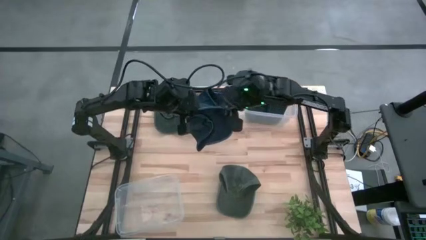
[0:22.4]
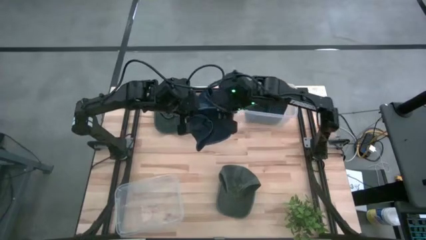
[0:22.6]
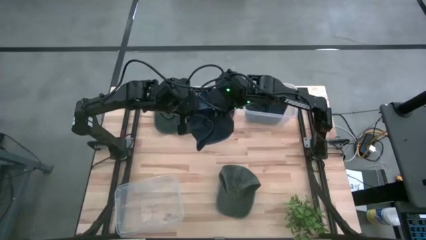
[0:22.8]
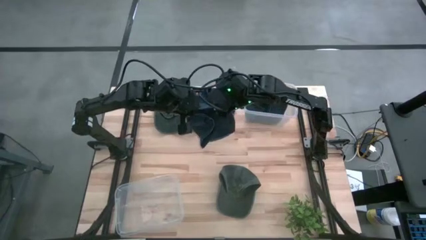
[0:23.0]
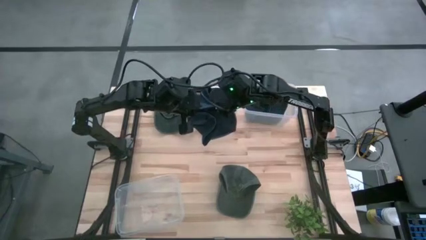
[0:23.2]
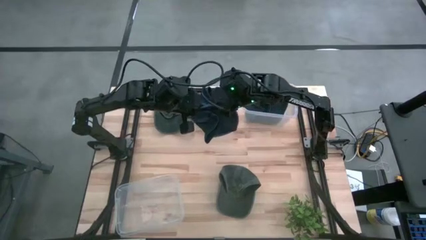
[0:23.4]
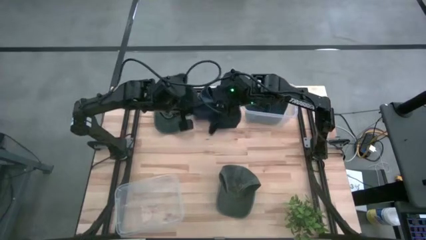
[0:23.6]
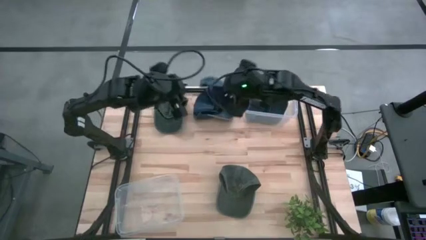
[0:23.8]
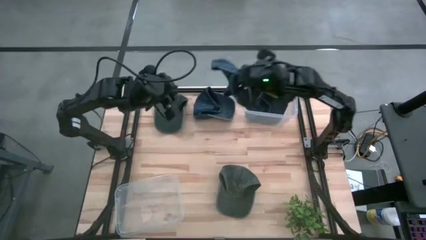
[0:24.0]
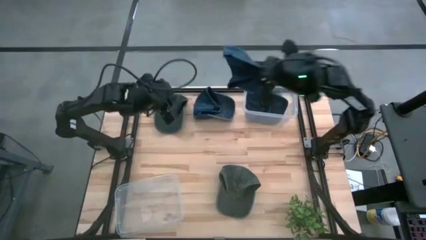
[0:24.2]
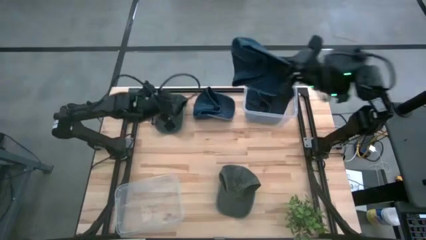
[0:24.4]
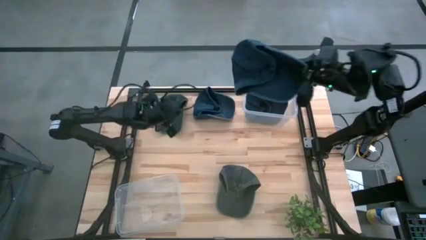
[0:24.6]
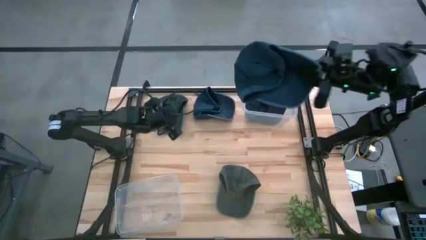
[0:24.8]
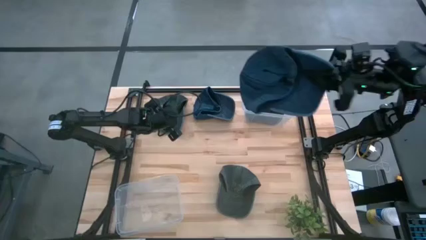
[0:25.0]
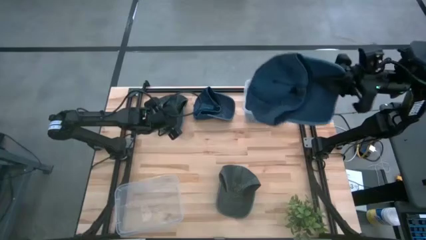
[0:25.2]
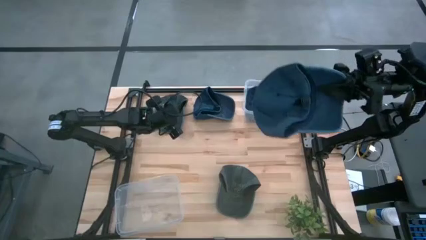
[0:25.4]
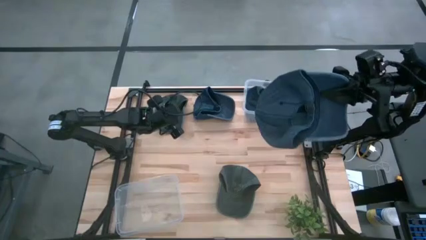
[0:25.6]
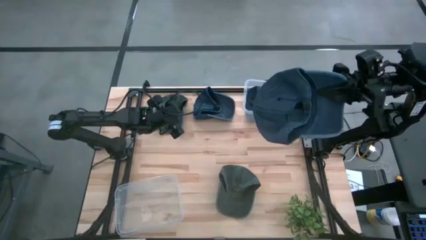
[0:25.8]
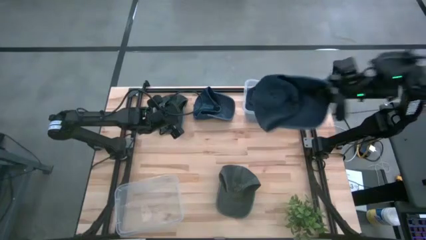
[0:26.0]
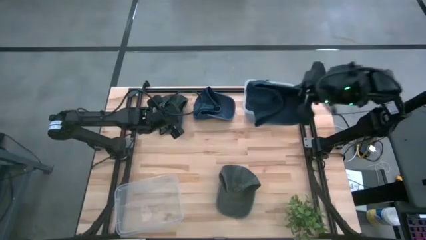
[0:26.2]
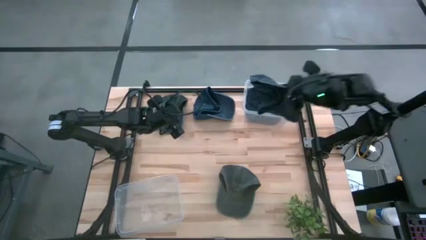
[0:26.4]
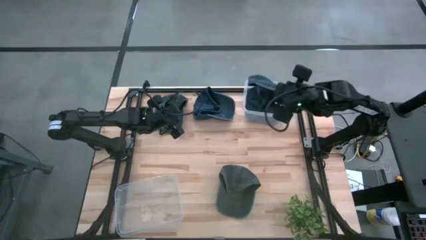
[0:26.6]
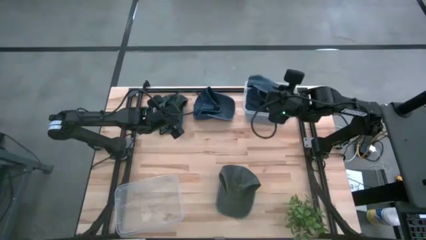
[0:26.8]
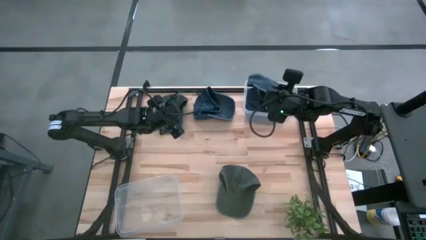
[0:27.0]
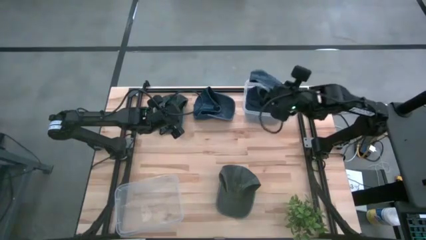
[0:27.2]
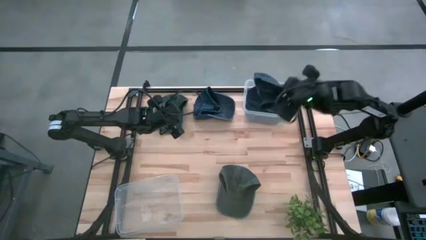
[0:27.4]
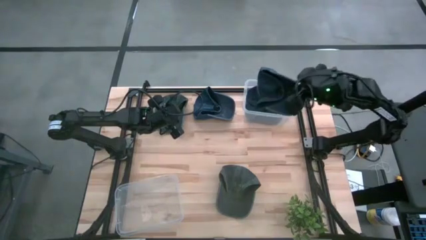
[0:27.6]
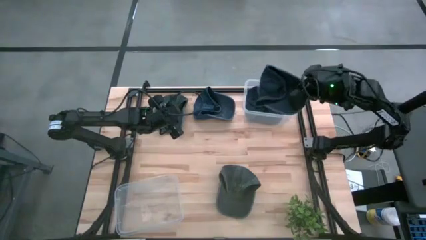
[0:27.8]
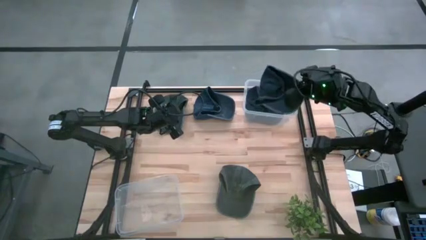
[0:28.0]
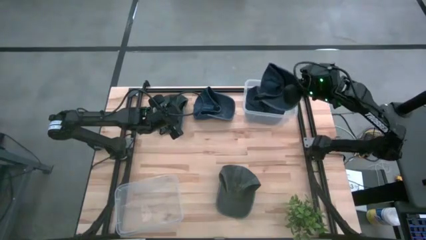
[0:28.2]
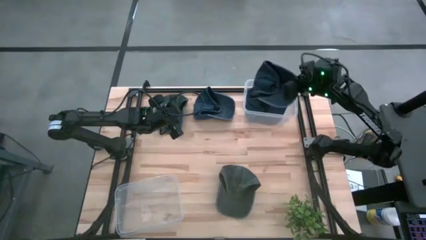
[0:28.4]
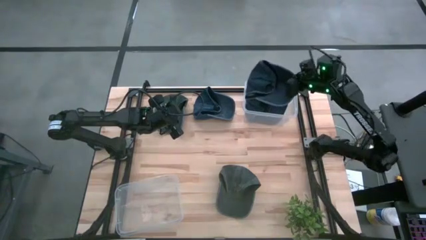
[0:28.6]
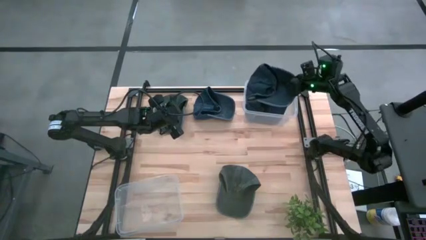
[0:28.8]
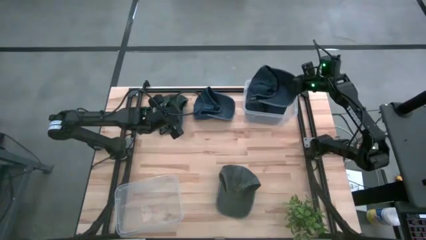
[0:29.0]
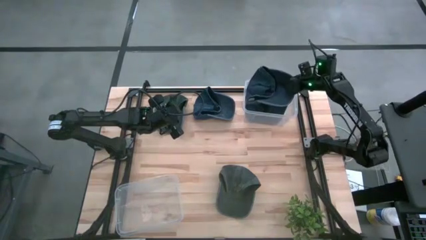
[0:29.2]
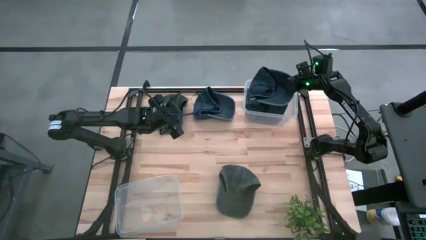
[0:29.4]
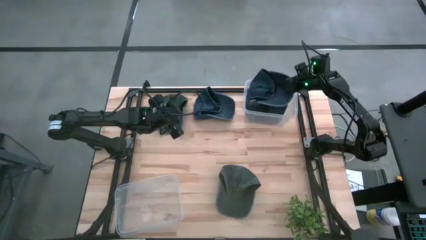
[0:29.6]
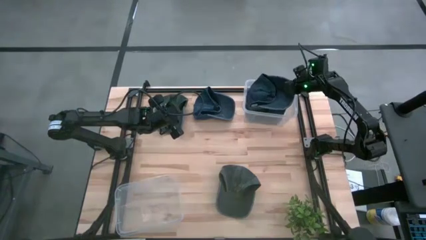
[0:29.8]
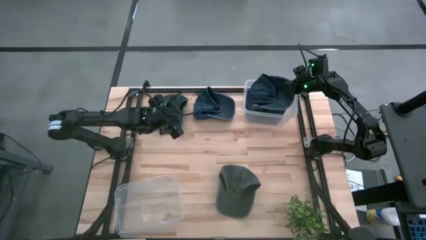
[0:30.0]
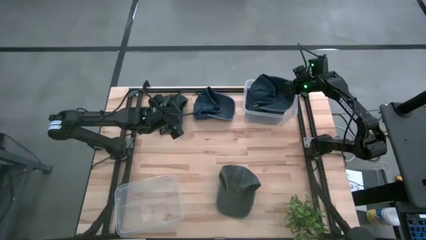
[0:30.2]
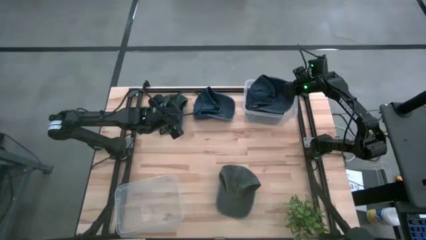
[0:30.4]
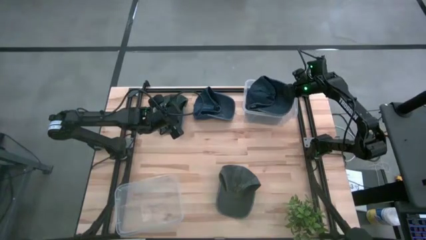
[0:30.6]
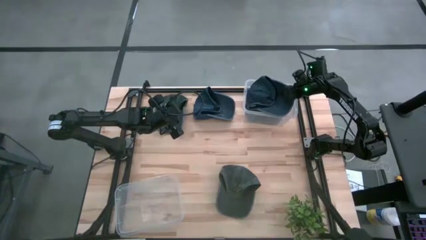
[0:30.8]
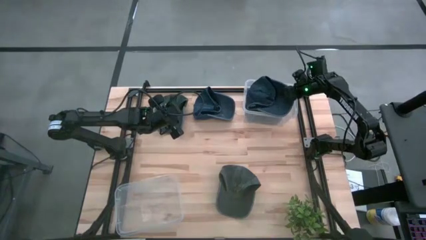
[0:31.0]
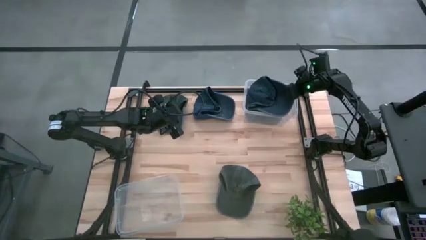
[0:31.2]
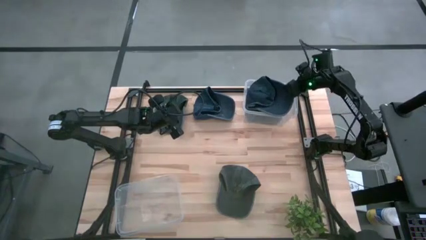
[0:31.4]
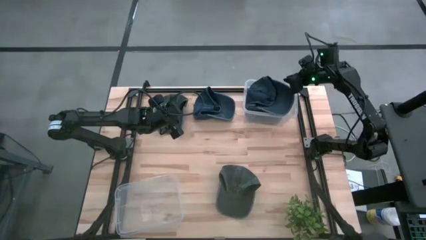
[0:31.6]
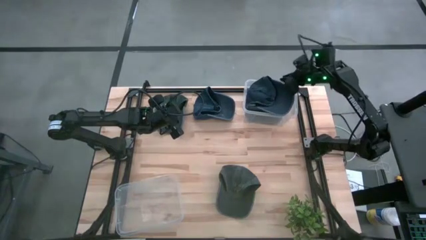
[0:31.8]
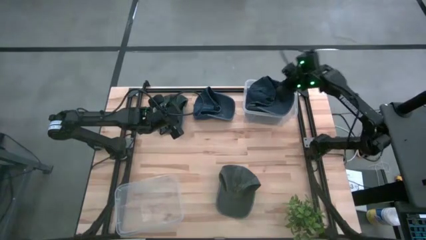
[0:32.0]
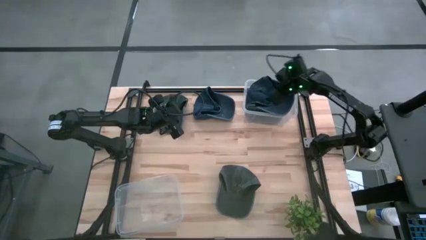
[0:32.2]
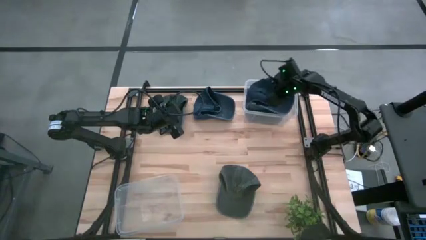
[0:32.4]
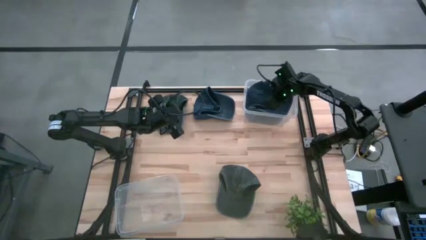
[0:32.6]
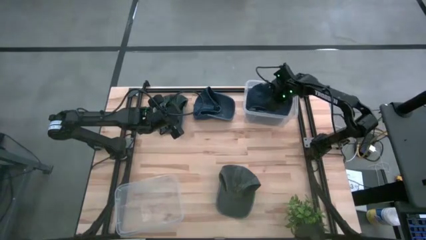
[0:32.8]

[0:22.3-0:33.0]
Task: Pick & Place hat
Put the bottom blue cap into the top transparent bin

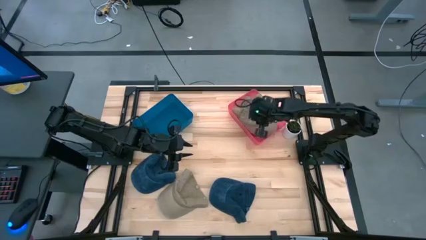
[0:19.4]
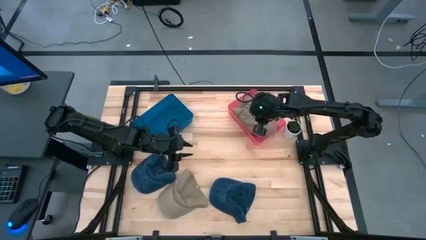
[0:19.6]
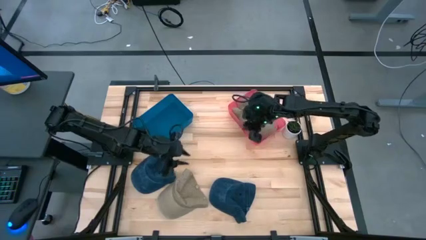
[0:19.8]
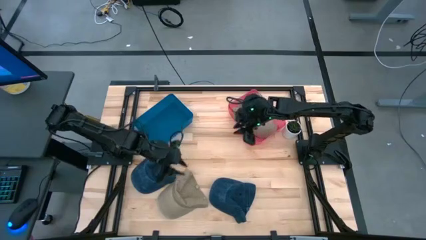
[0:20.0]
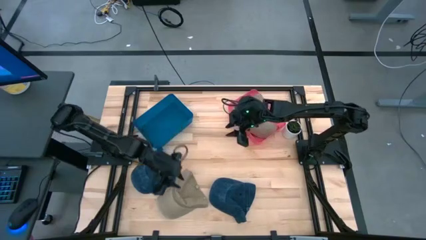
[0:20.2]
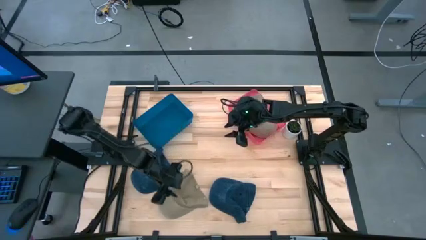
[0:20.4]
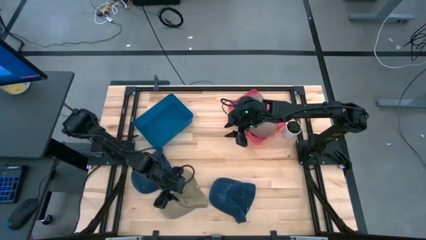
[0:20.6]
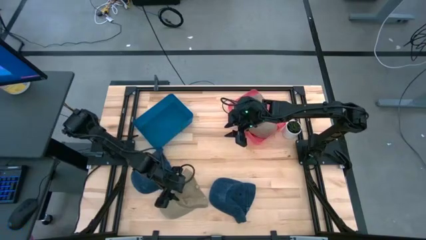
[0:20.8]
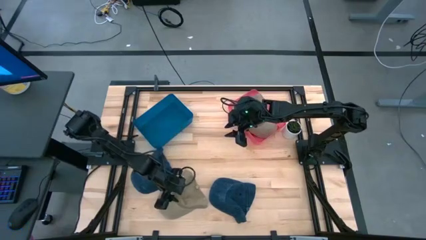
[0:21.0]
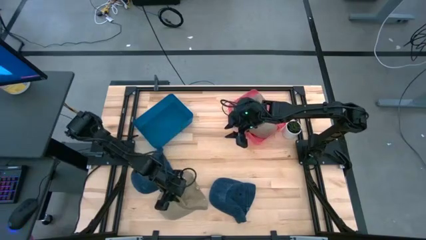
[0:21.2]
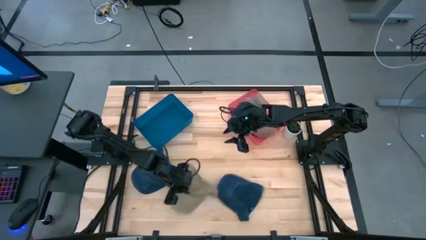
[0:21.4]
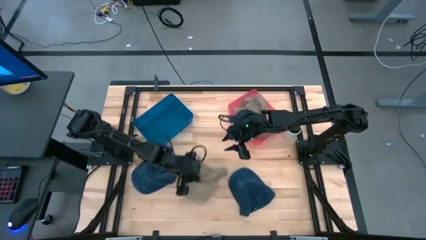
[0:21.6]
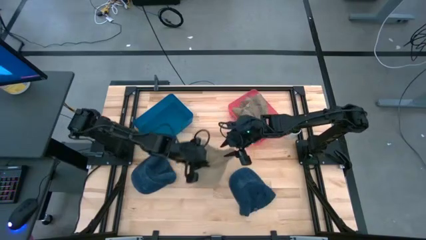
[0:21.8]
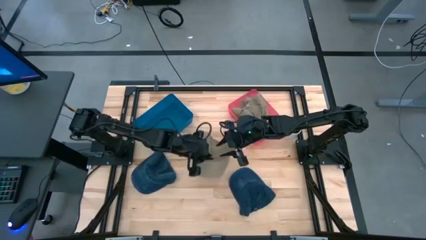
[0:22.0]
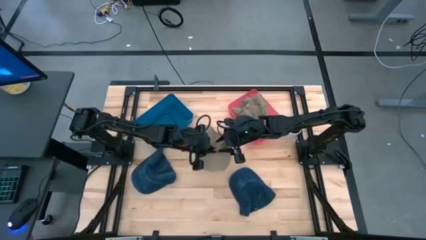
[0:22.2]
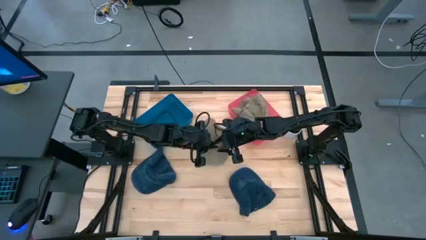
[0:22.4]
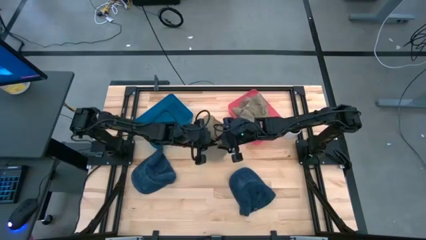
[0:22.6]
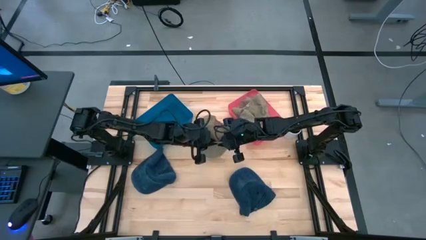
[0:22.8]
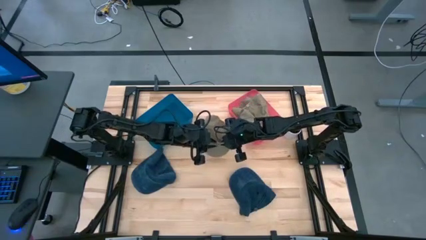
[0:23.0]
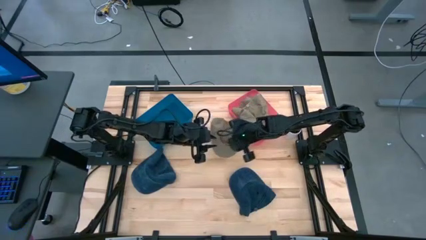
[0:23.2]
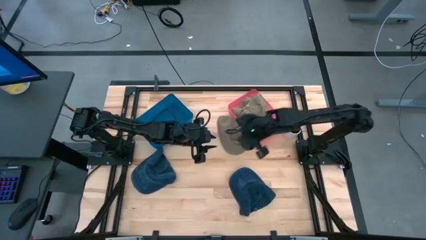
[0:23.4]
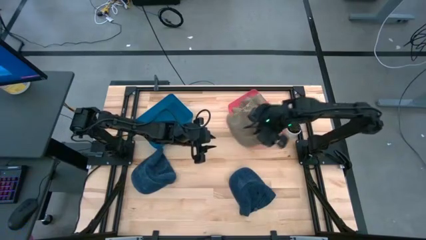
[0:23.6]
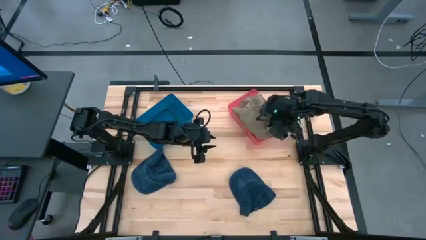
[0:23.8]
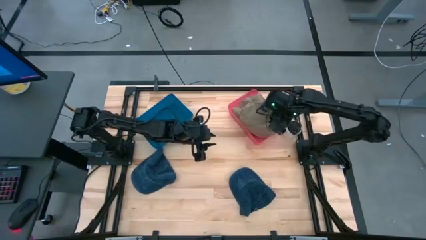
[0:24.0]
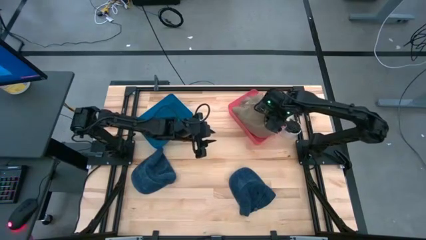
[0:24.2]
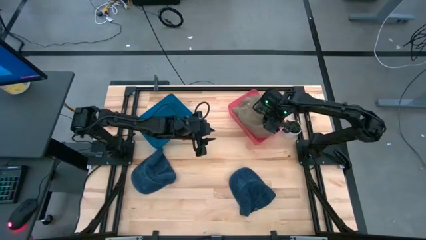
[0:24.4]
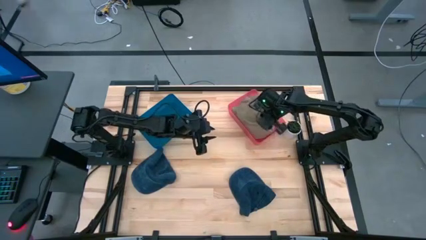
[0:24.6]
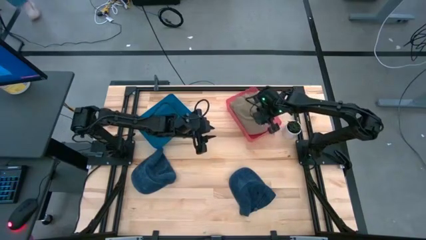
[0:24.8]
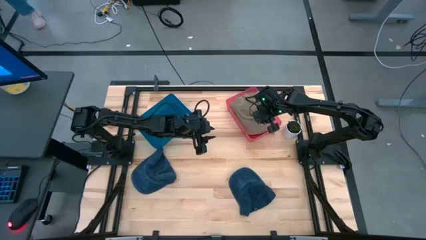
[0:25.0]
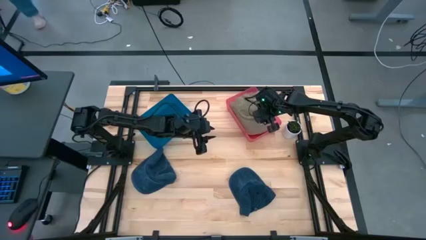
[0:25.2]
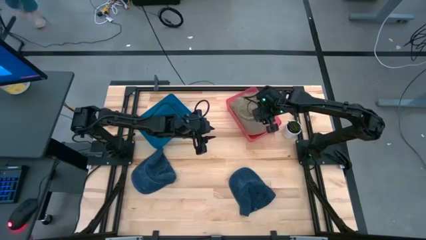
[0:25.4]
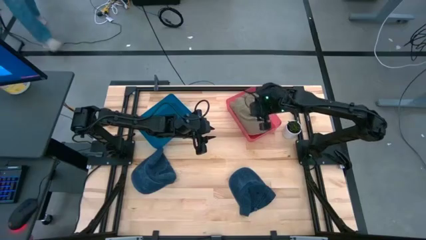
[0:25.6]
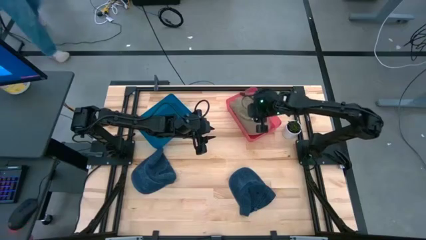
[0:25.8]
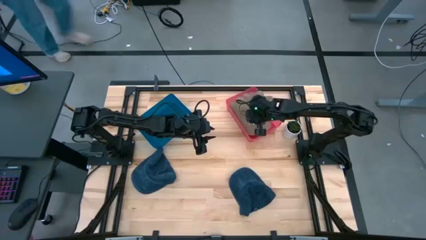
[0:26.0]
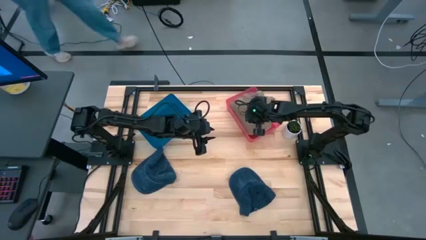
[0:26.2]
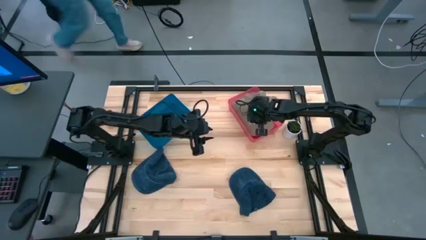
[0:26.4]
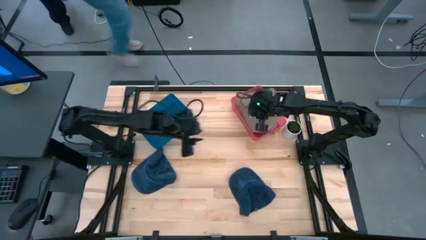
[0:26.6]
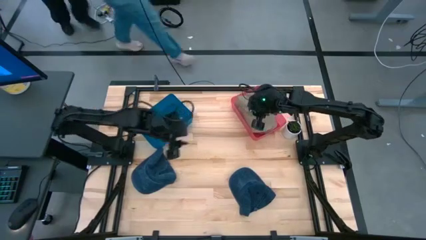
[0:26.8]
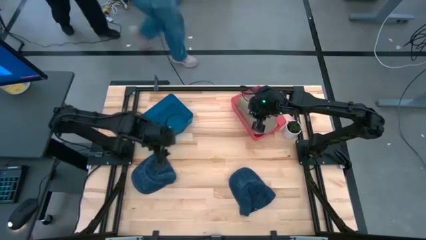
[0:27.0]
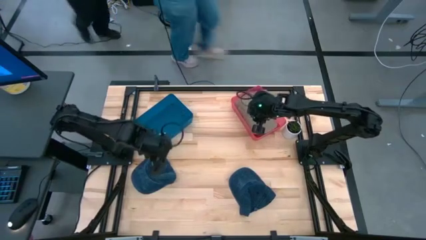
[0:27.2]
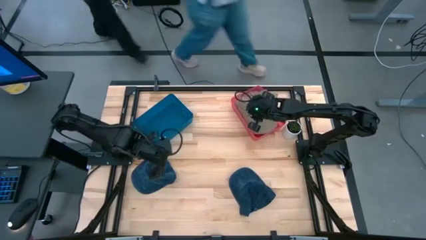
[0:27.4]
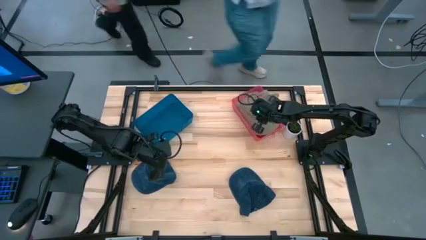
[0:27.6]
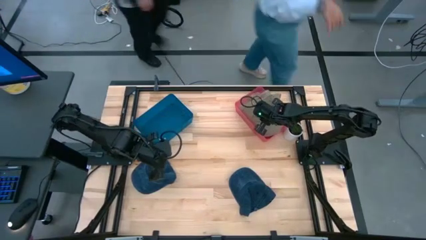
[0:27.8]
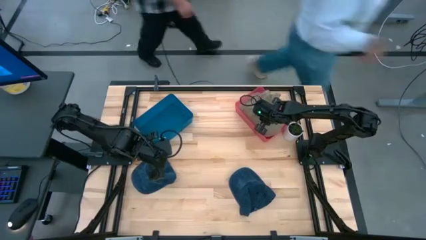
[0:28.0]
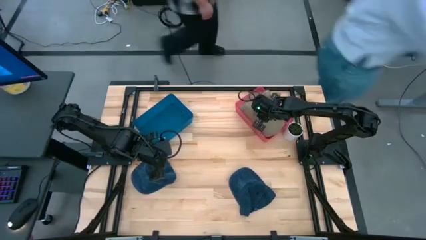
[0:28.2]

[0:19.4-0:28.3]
Task: Pick & Place hat
Put the brown cap into the red bin
